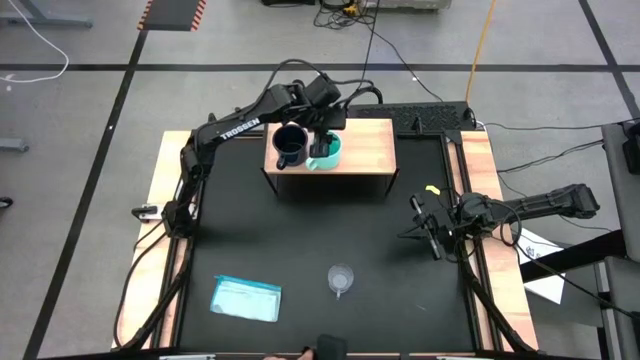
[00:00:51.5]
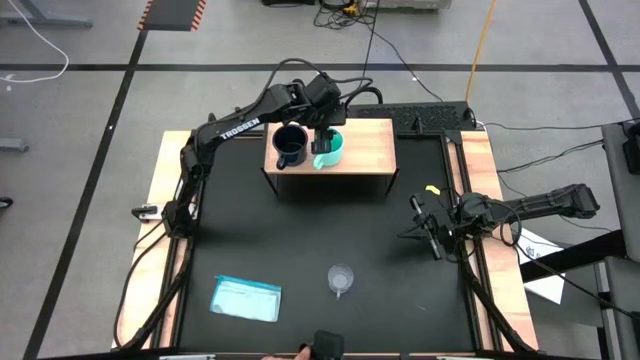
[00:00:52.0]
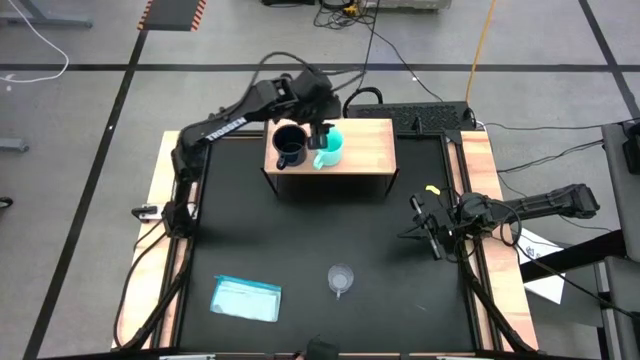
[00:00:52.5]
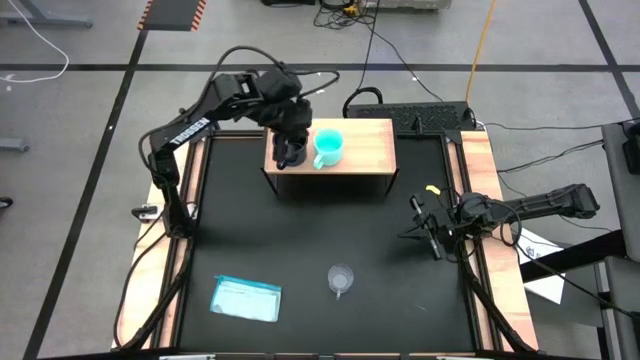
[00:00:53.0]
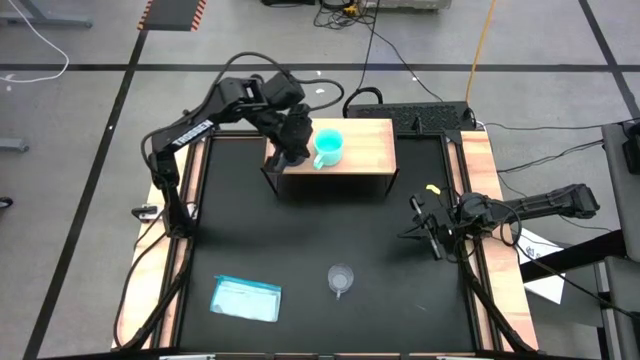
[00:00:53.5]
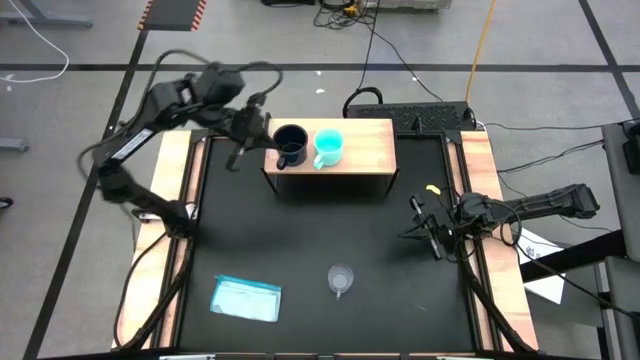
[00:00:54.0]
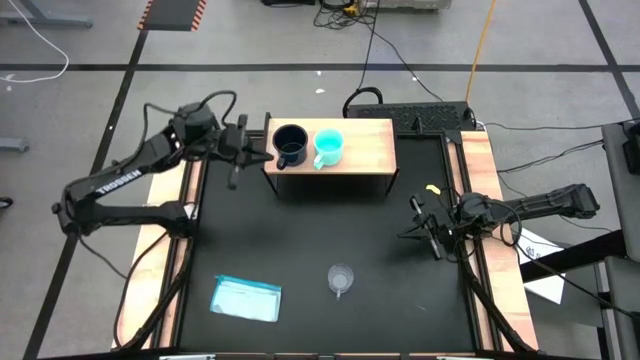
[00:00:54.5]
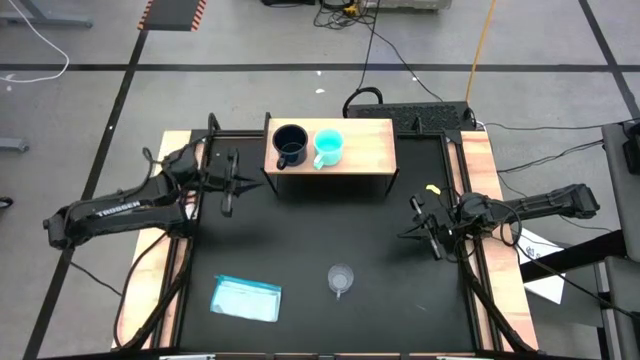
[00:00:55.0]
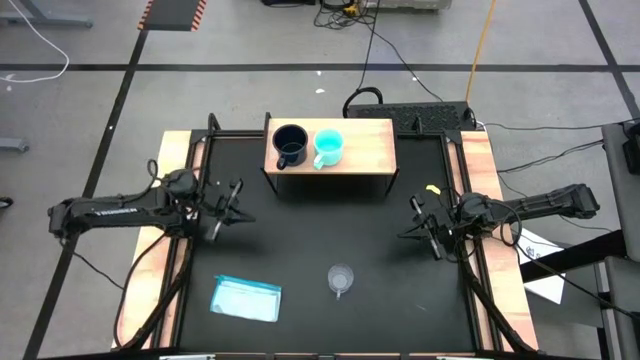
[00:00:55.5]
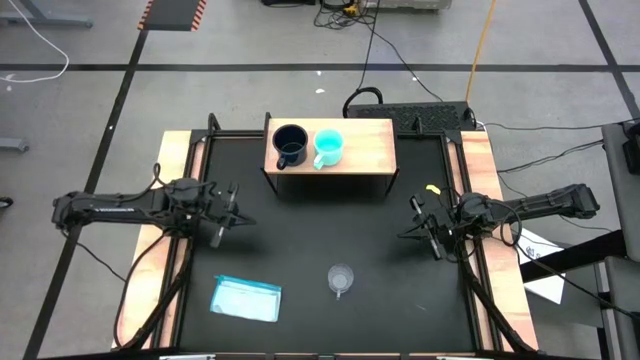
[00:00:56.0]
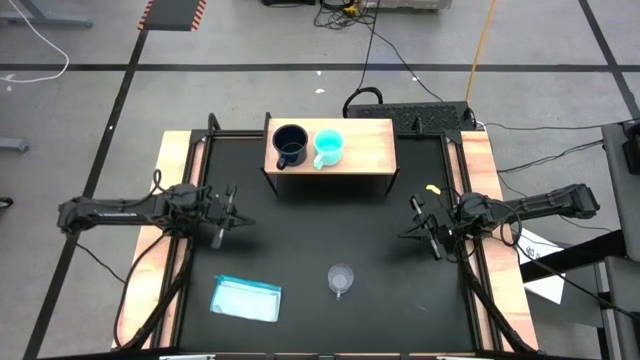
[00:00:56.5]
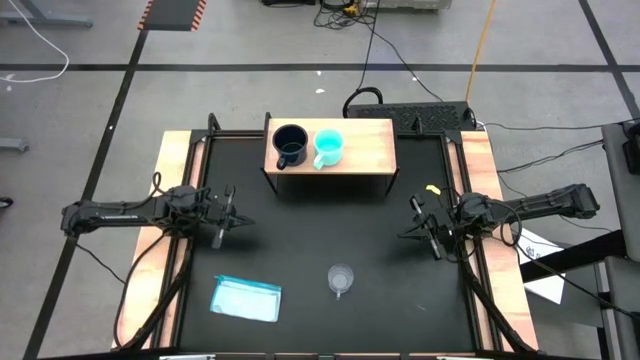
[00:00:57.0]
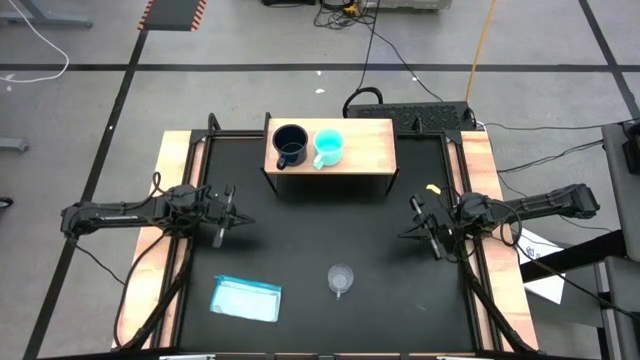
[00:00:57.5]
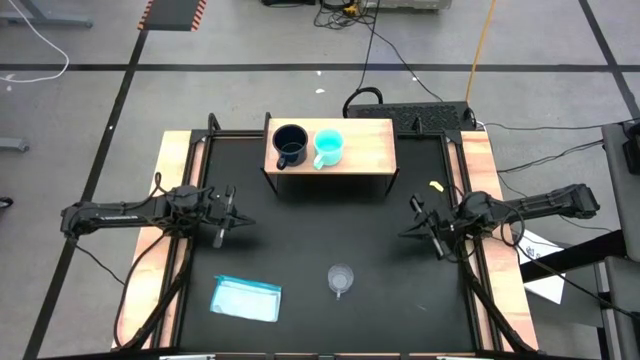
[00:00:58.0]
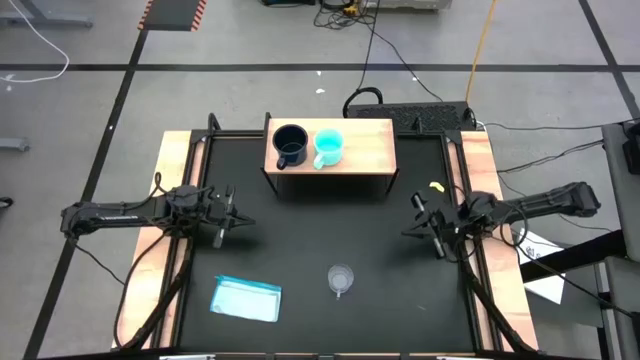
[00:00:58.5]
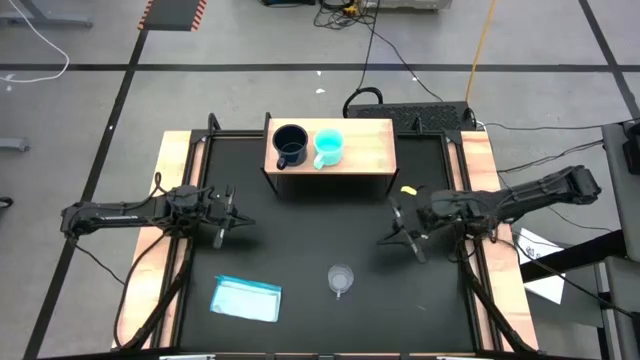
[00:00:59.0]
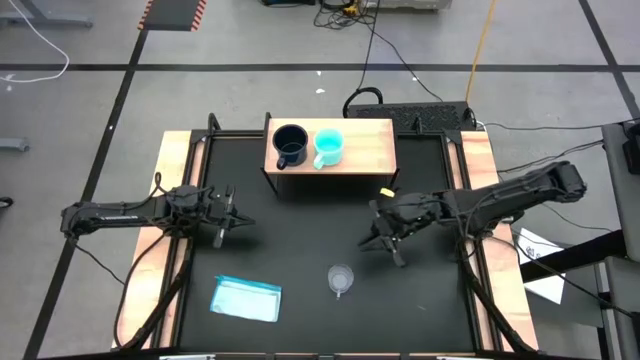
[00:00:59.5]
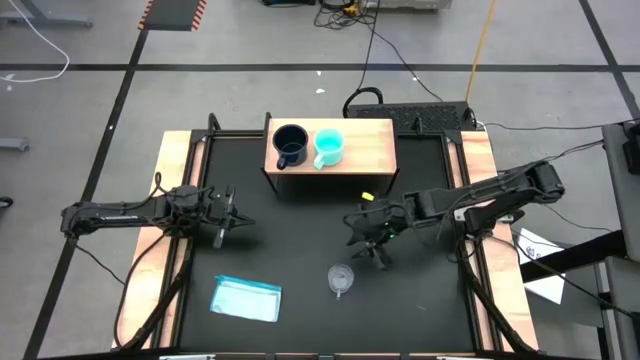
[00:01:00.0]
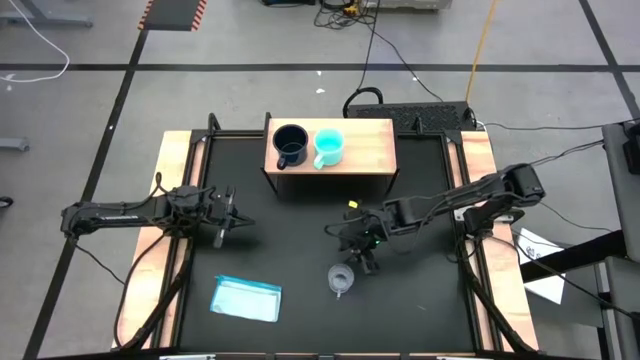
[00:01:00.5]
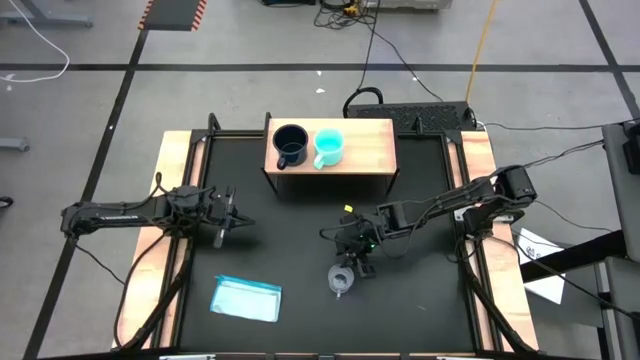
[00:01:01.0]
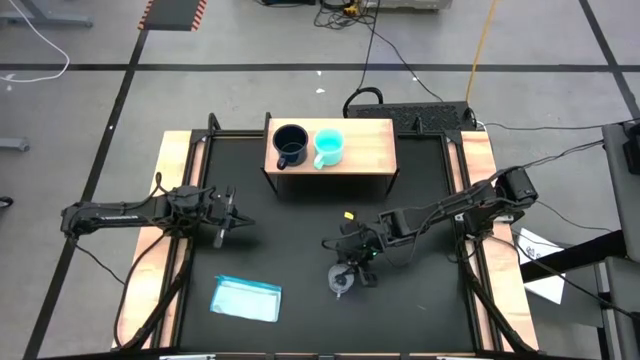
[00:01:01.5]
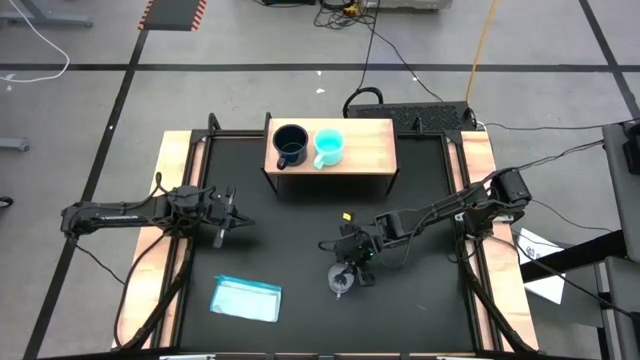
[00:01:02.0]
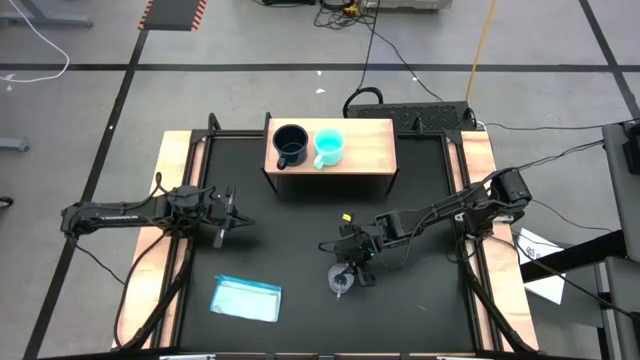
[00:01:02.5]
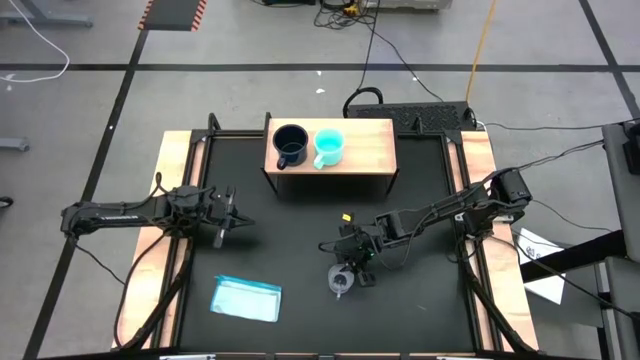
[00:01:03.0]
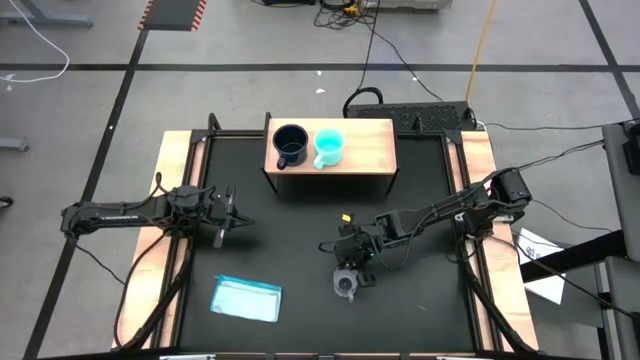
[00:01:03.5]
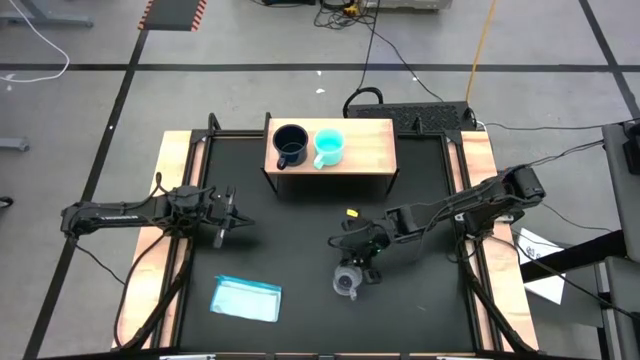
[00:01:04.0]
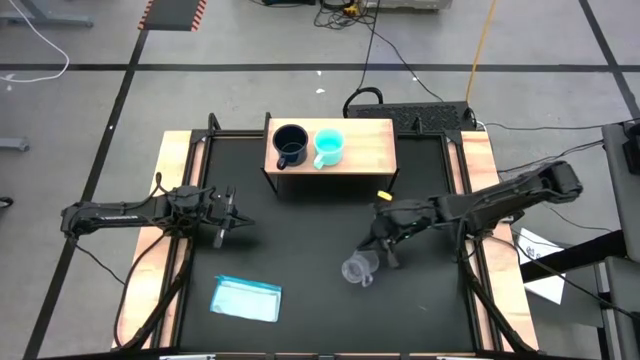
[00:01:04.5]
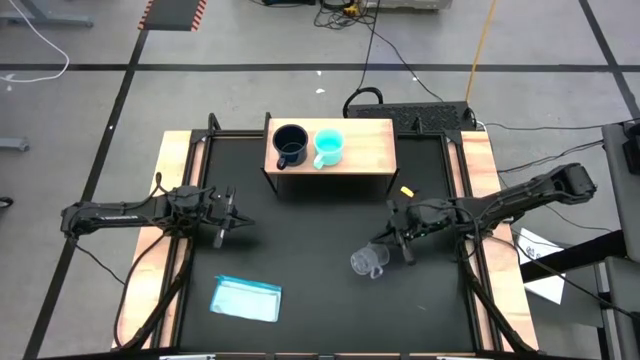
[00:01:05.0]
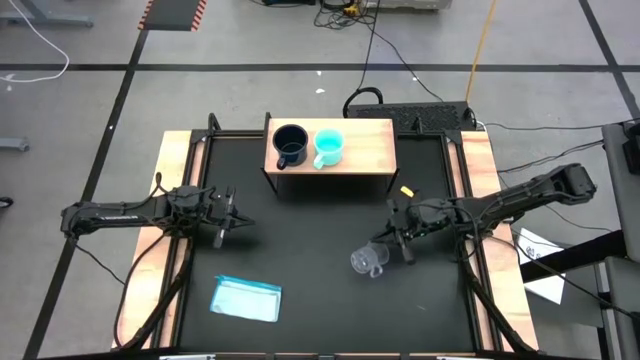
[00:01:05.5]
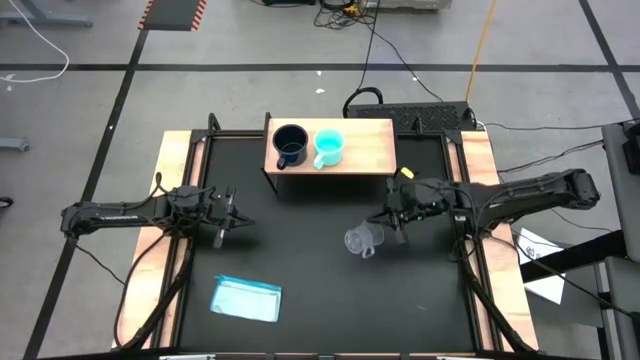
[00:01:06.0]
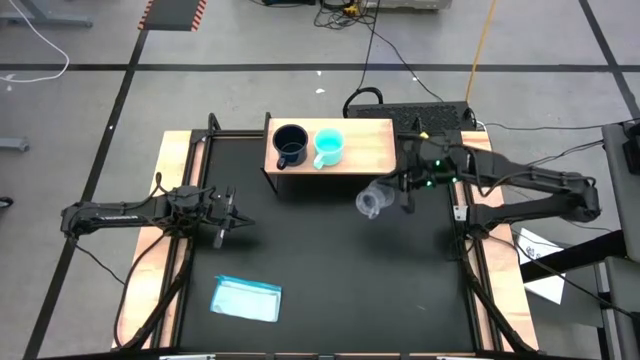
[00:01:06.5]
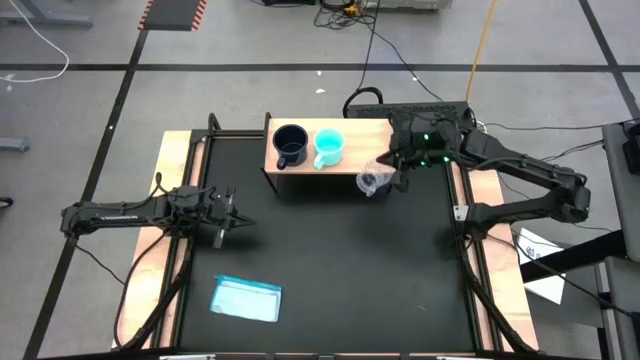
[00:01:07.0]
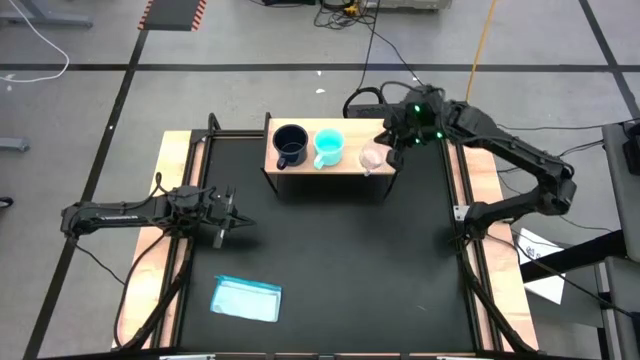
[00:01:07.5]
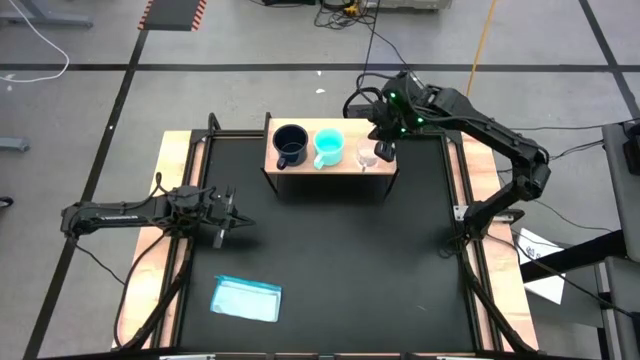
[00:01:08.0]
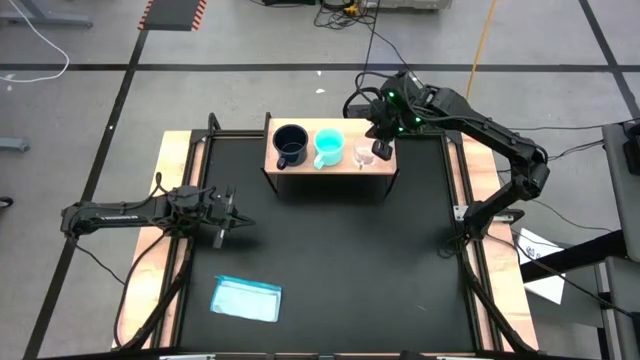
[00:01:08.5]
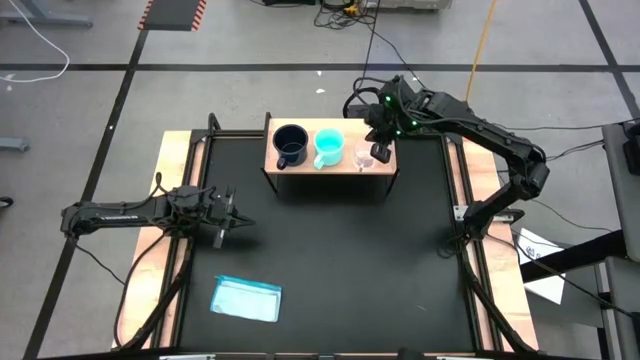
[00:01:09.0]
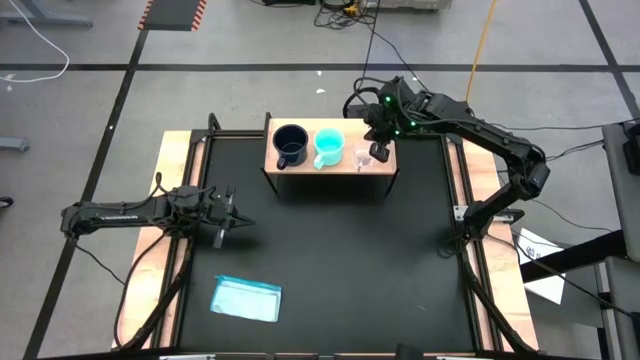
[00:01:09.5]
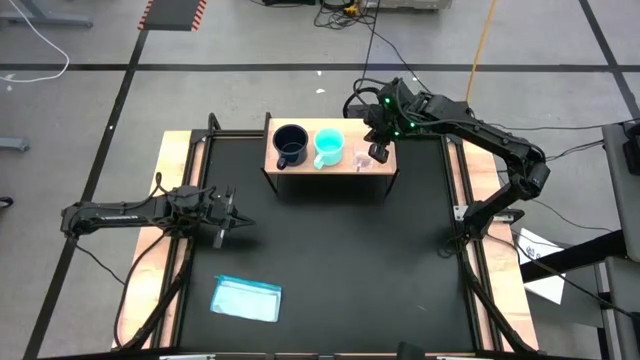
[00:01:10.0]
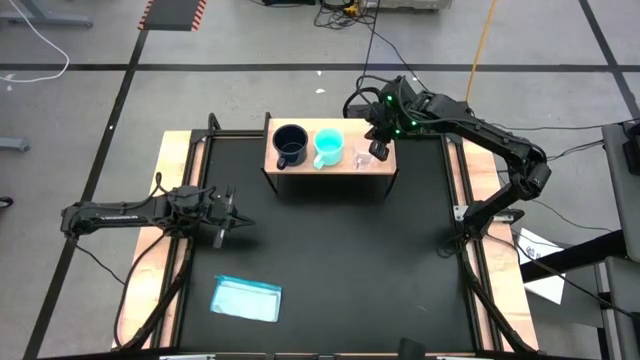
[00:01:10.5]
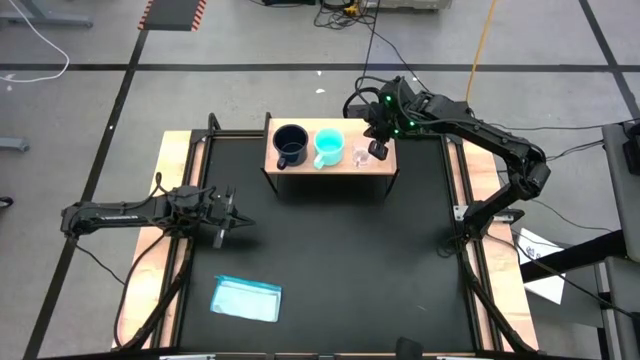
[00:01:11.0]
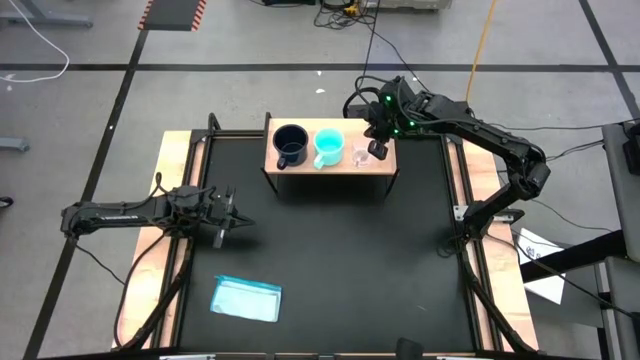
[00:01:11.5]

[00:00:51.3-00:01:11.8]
Task: Stack small to large cups/mugs on shelf
Put the transparent mug on the shelf
